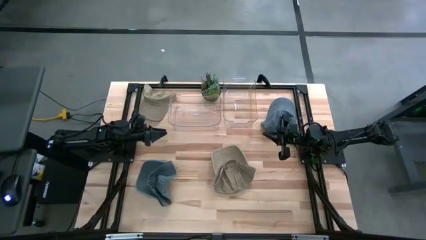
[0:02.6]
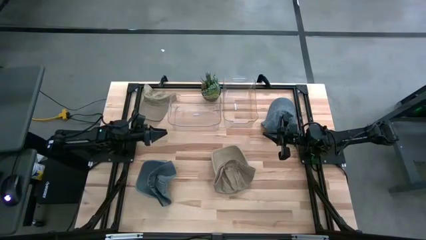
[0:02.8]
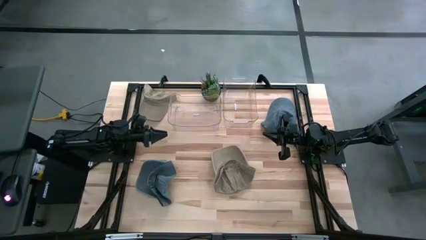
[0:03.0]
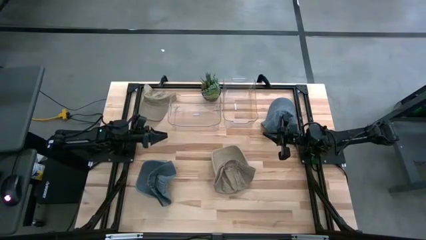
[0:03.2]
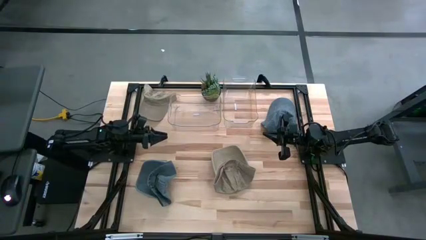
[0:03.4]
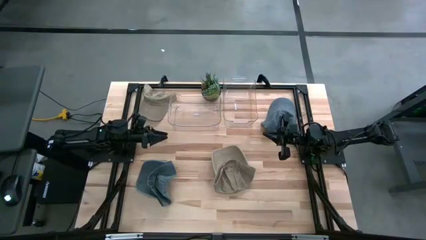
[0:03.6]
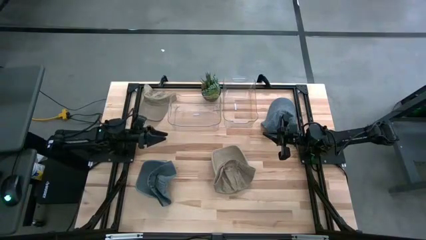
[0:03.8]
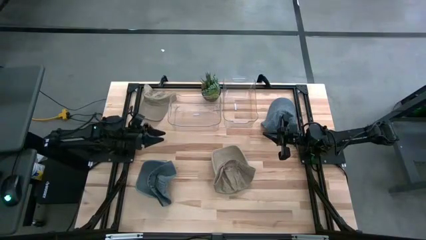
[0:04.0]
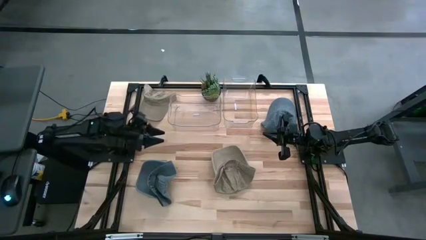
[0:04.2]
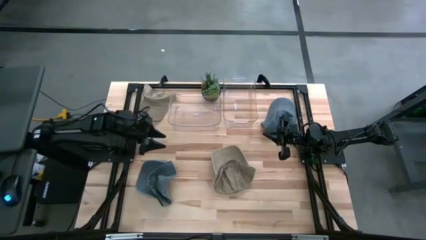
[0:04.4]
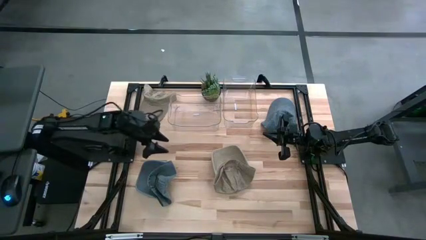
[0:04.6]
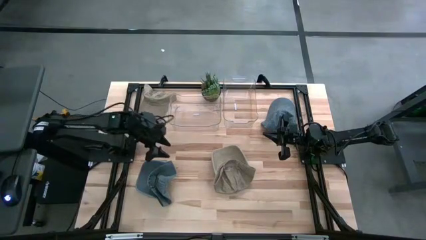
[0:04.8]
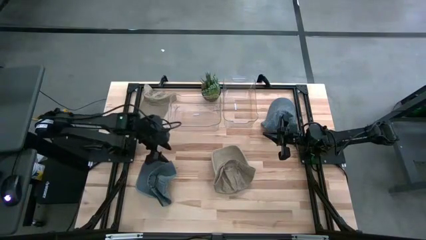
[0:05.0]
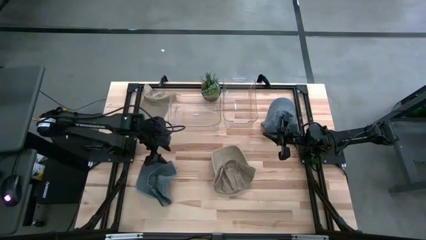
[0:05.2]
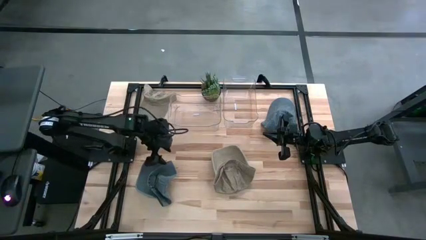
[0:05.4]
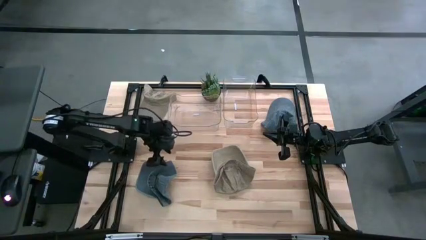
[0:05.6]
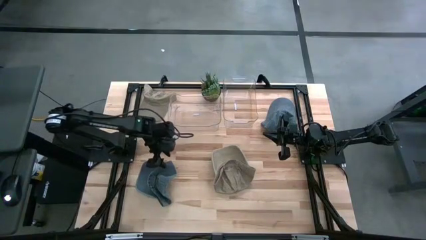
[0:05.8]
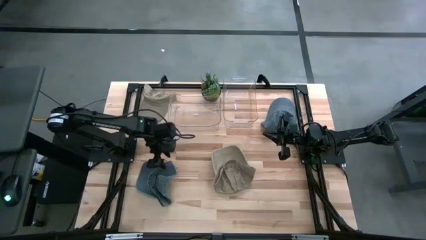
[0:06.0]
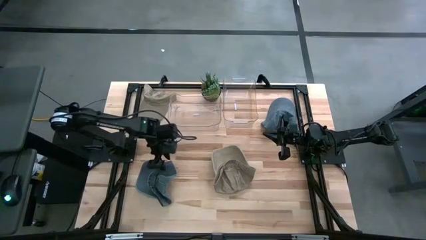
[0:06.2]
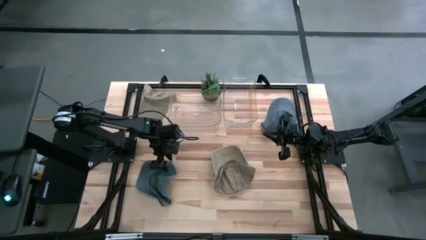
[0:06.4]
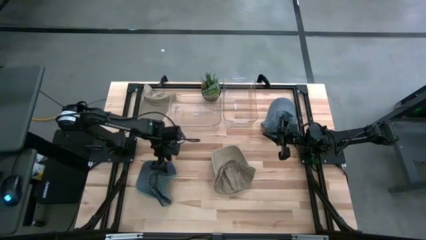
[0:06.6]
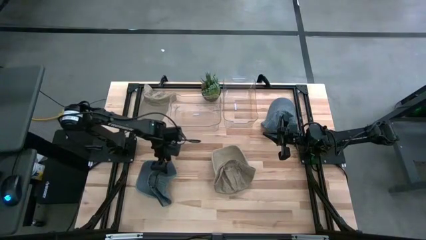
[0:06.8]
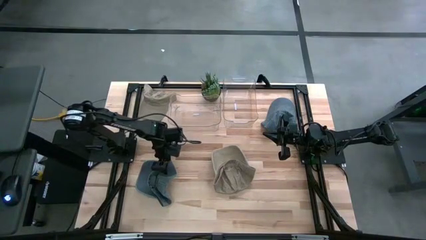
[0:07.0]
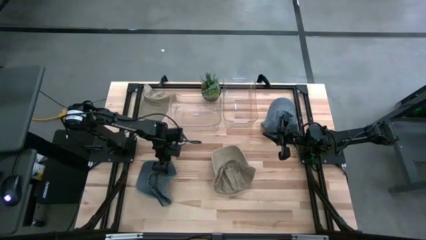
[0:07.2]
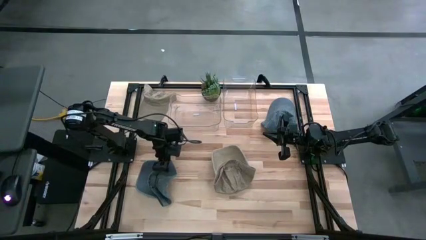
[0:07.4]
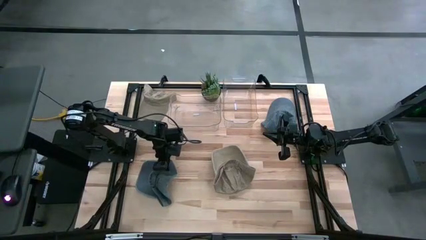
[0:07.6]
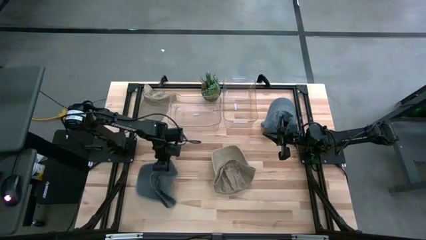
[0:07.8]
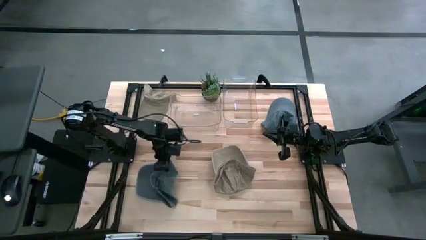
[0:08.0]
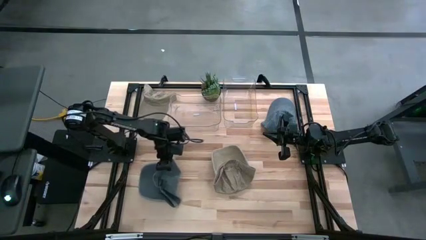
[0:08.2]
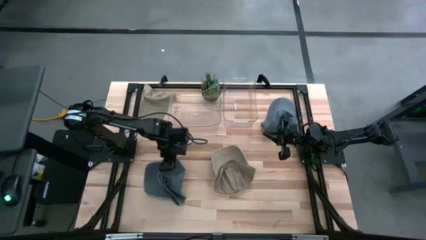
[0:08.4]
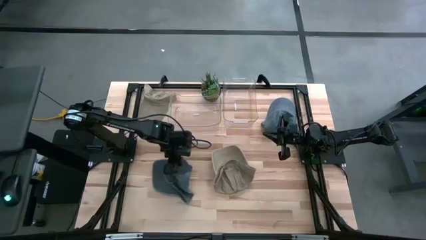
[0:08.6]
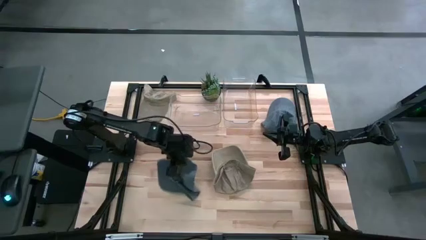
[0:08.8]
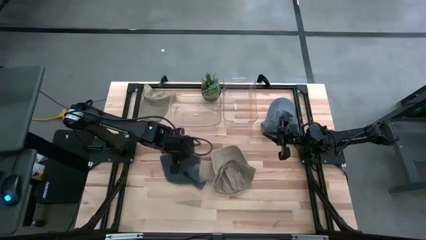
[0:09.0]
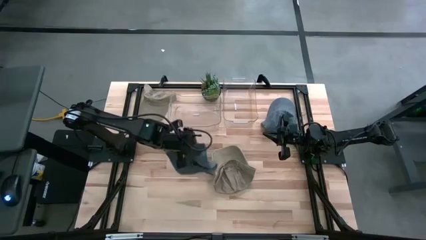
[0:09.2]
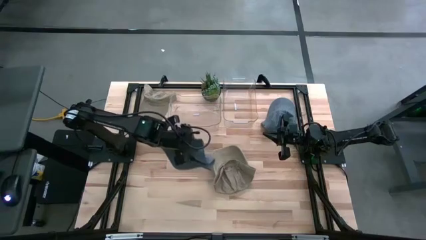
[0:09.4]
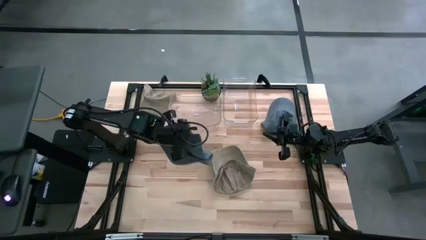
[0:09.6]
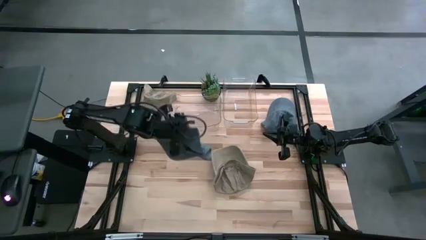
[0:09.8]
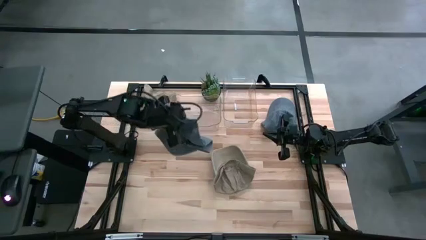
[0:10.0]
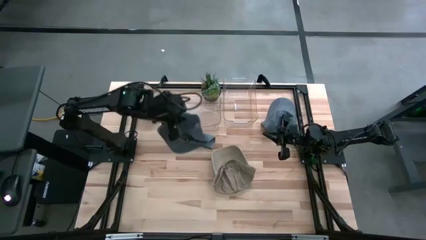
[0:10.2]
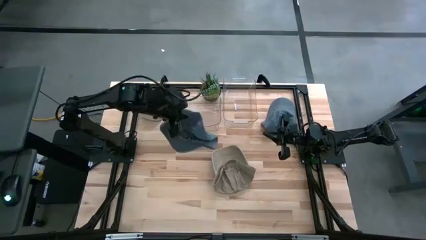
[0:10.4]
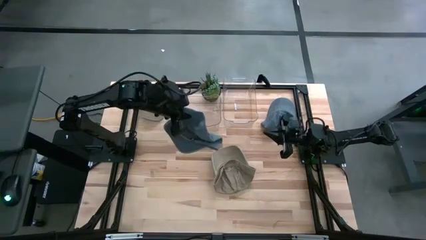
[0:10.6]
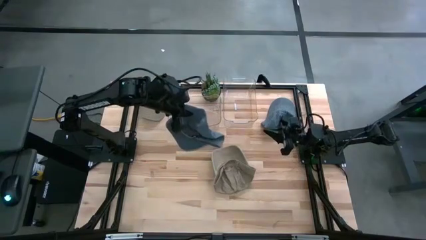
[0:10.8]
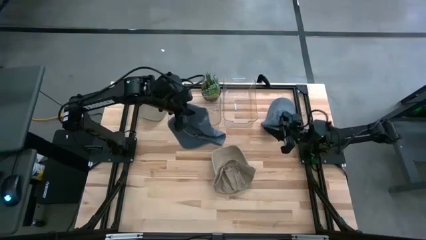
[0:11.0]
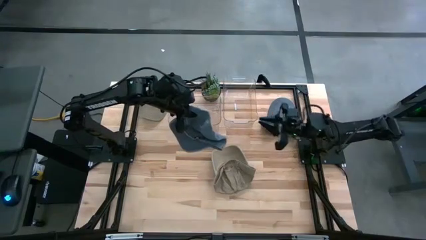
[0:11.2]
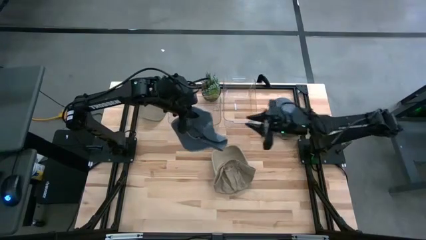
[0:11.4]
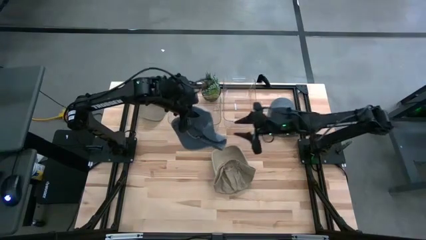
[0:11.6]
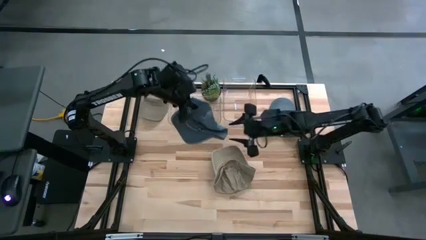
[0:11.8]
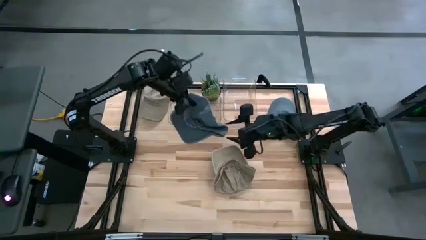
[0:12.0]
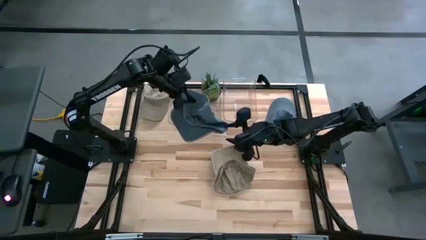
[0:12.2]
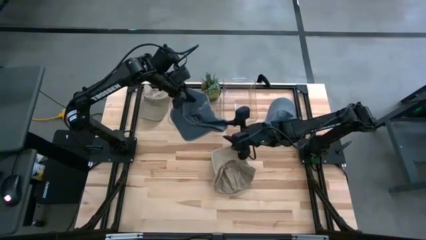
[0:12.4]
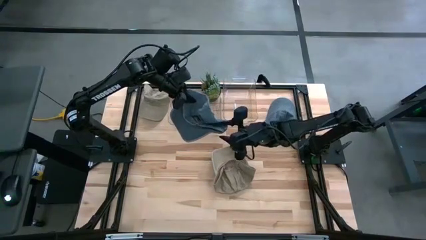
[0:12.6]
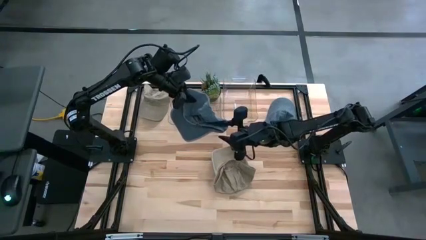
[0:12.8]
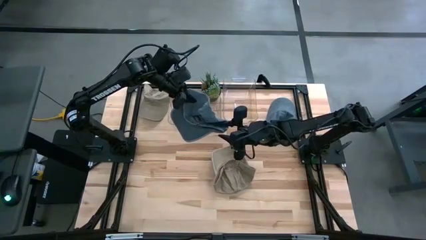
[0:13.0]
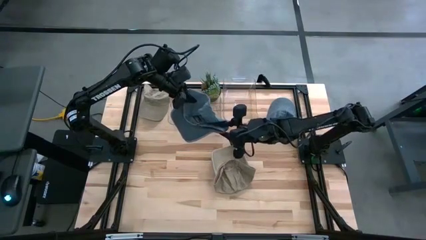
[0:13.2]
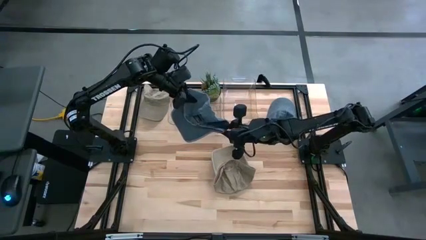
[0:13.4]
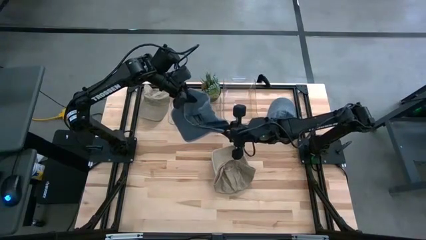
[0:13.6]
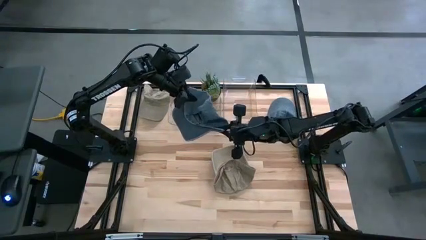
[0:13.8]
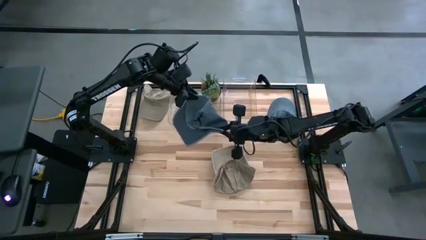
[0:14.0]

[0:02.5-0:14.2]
Task: Pick & Place hat
Put the bottom gray cap into the left transparent bin

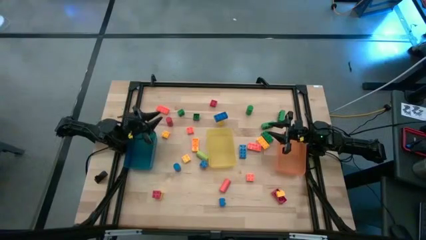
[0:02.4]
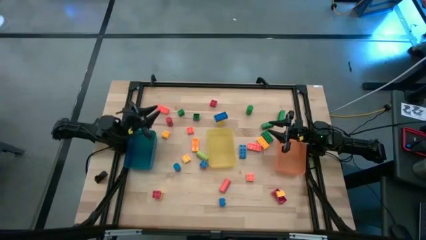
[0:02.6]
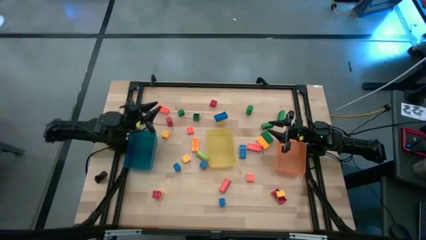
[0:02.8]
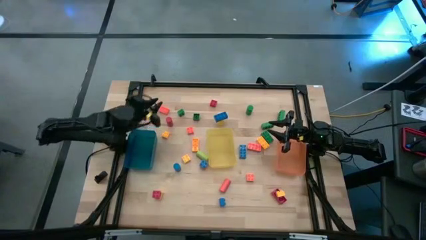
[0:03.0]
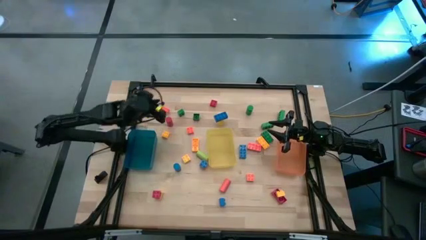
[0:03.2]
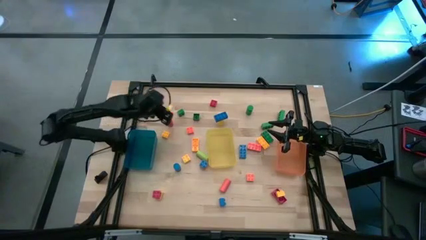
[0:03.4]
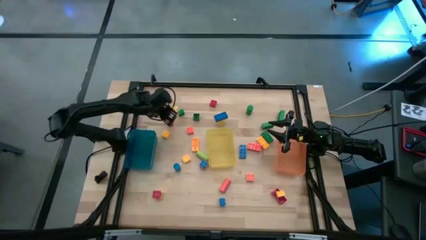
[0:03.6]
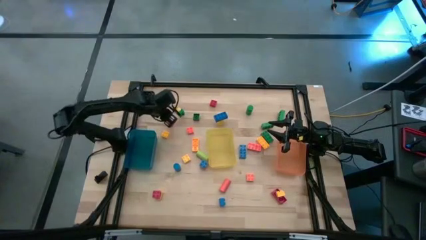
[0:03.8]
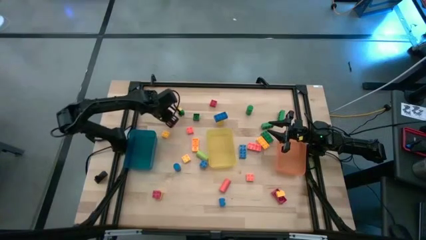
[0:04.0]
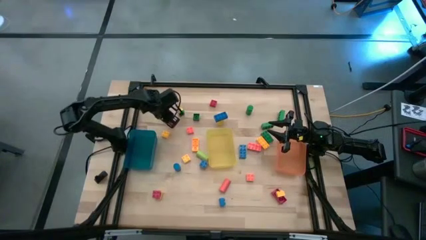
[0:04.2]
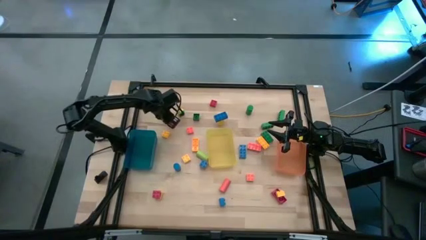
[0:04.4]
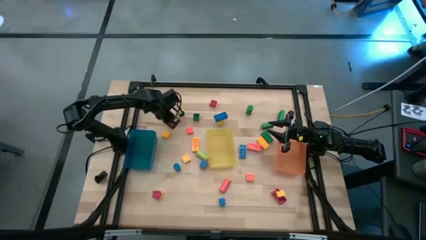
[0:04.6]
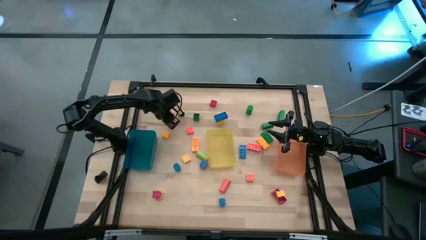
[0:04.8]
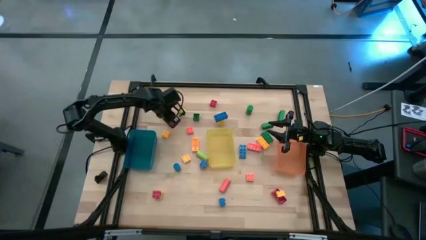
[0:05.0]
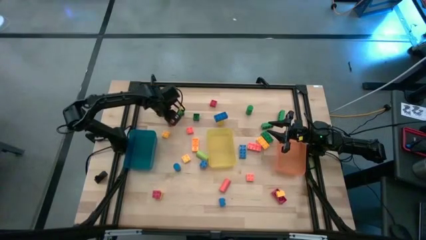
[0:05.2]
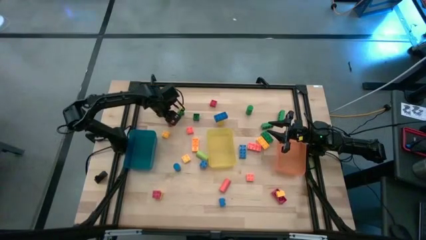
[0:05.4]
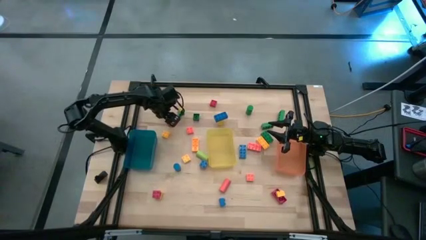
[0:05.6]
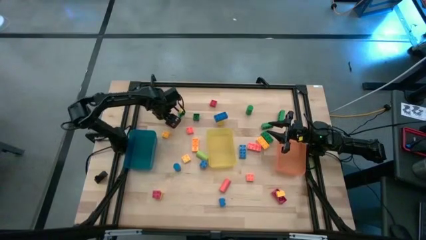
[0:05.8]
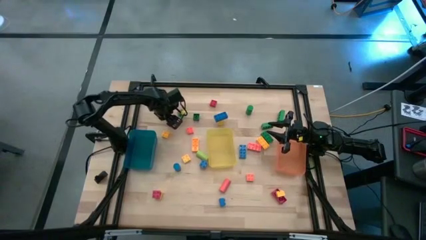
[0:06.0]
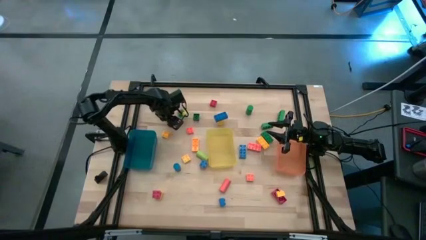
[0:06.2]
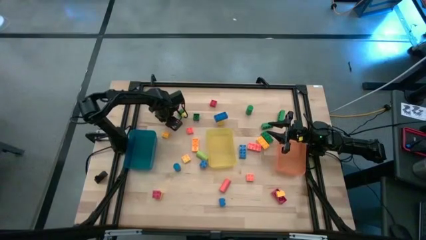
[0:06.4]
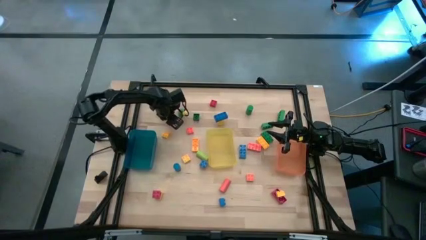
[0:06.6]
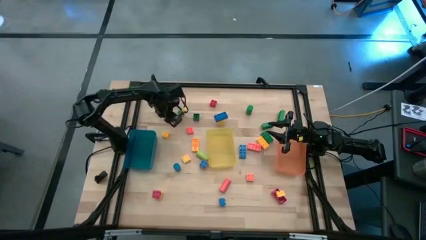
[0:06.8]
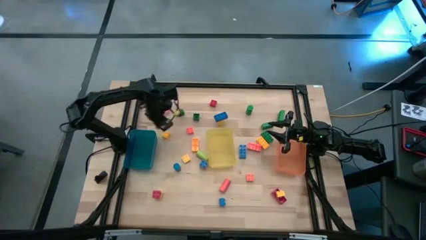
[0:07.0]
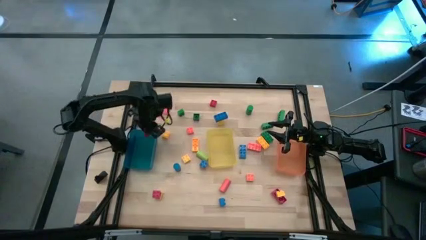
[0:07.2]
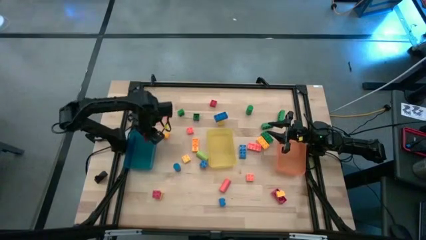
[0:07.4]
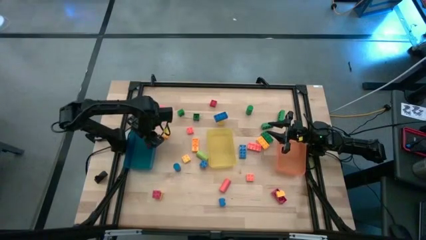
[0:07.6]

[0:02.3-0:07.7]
Task: Sort blocks by size
Put the red cylindrical block into the blue bin
